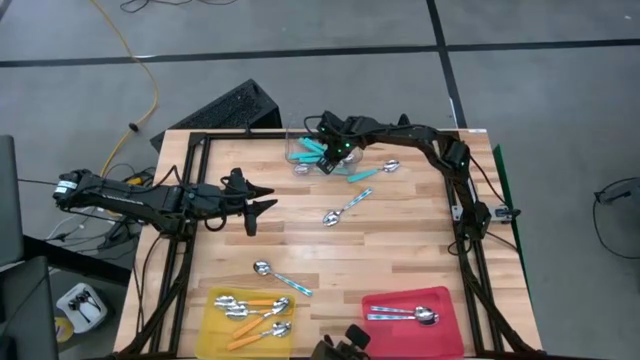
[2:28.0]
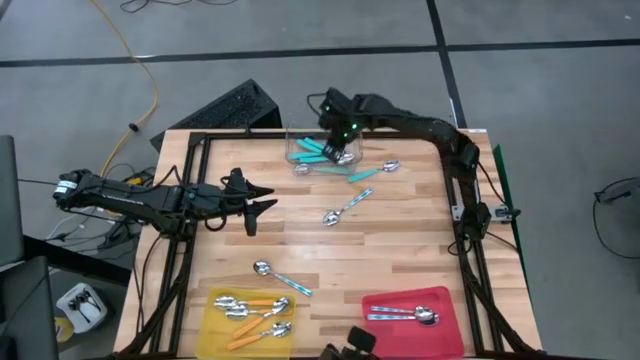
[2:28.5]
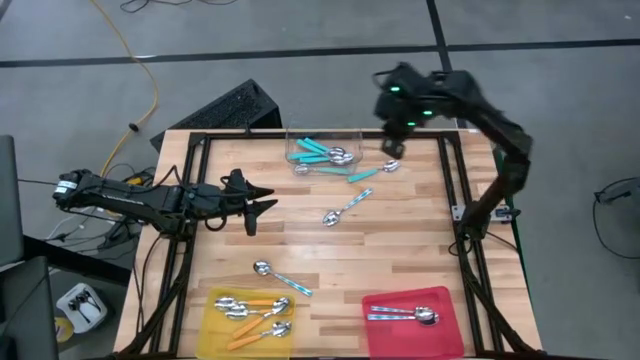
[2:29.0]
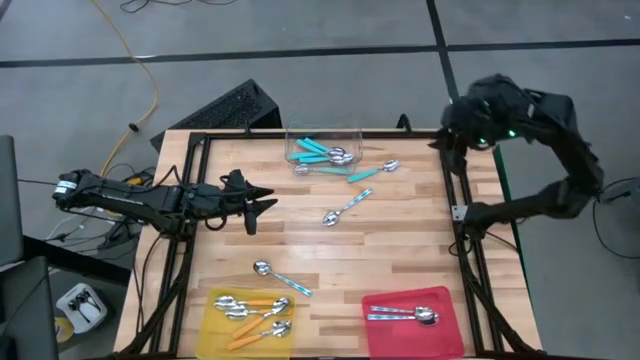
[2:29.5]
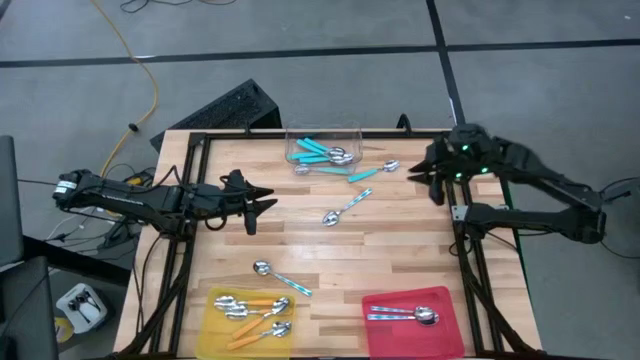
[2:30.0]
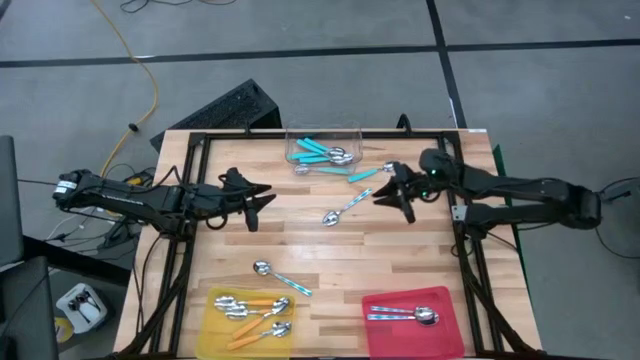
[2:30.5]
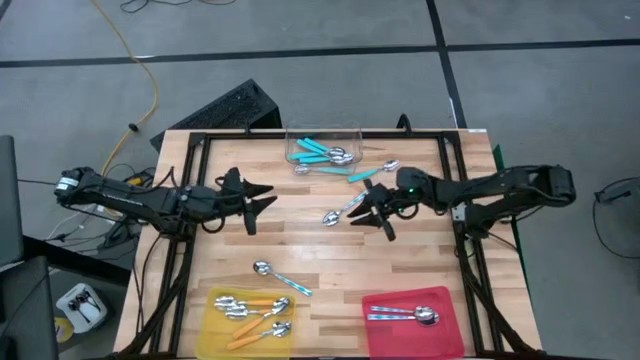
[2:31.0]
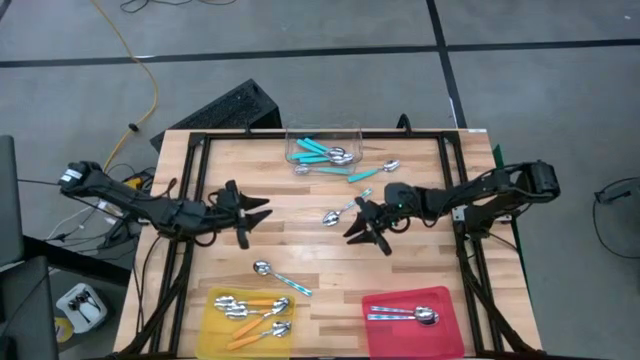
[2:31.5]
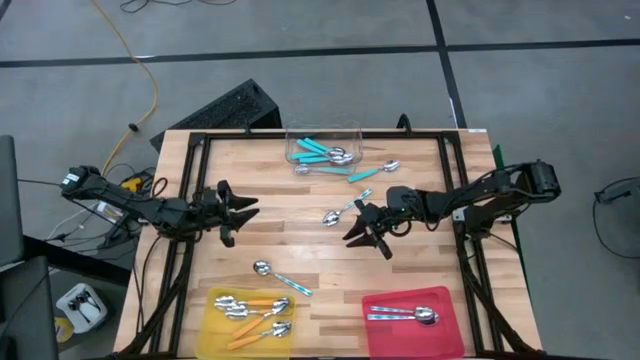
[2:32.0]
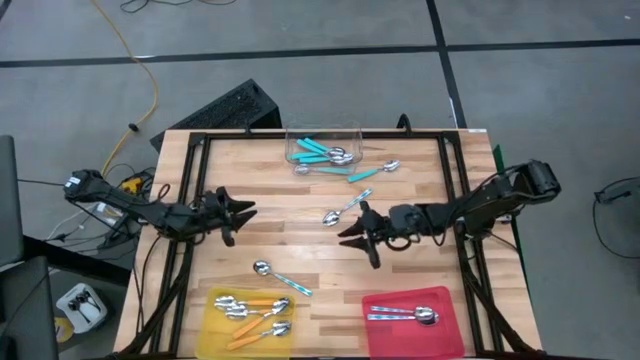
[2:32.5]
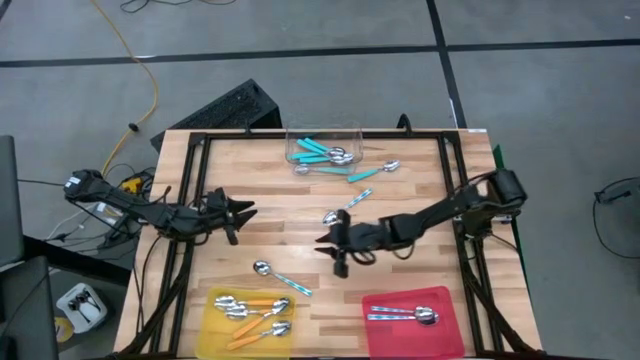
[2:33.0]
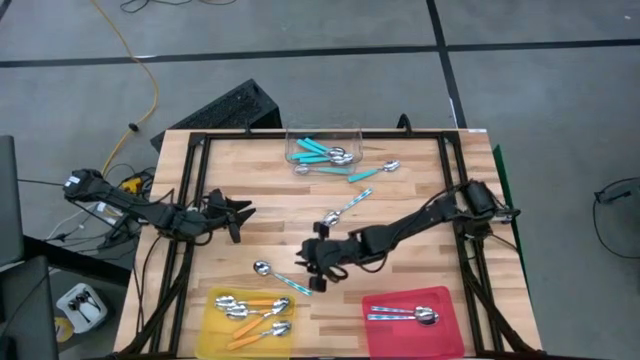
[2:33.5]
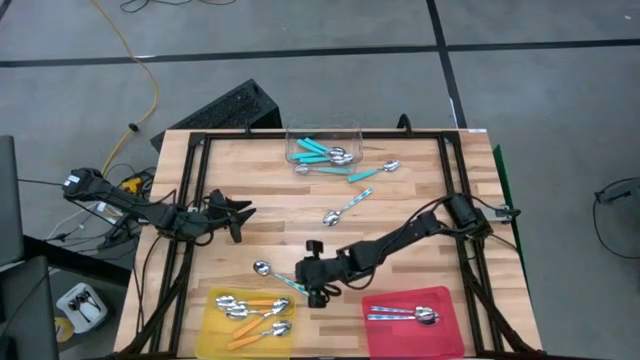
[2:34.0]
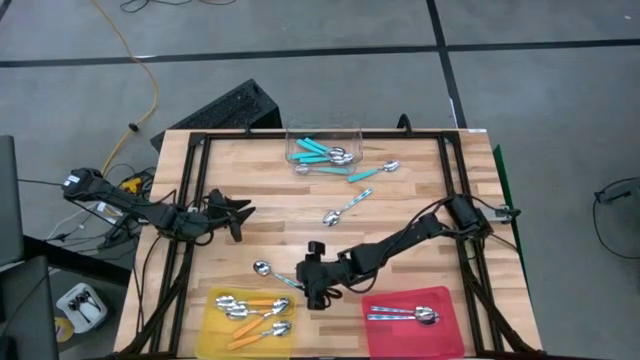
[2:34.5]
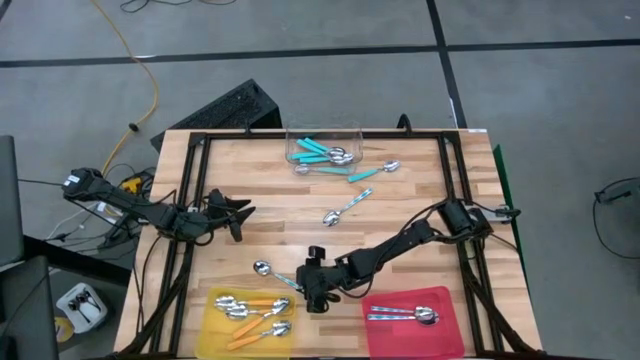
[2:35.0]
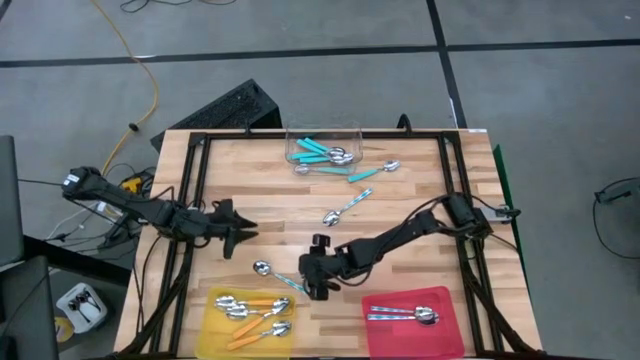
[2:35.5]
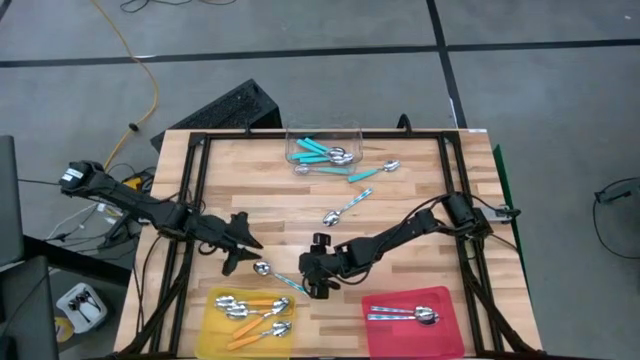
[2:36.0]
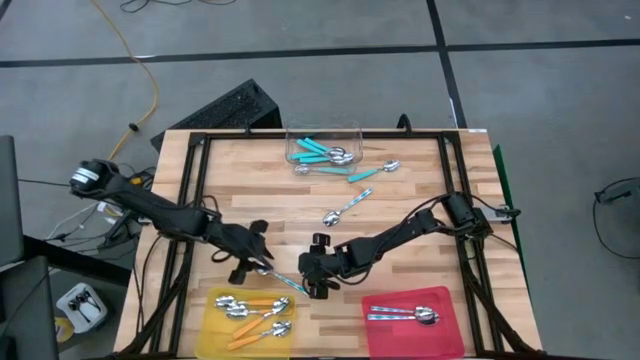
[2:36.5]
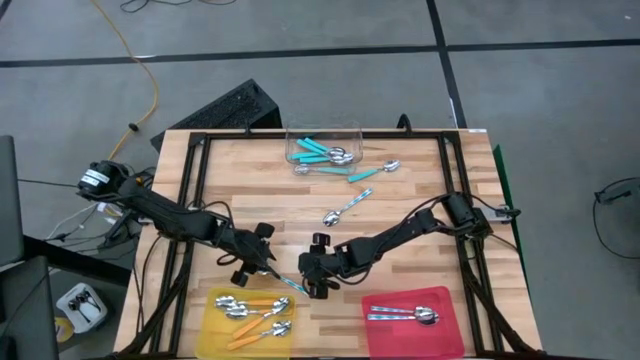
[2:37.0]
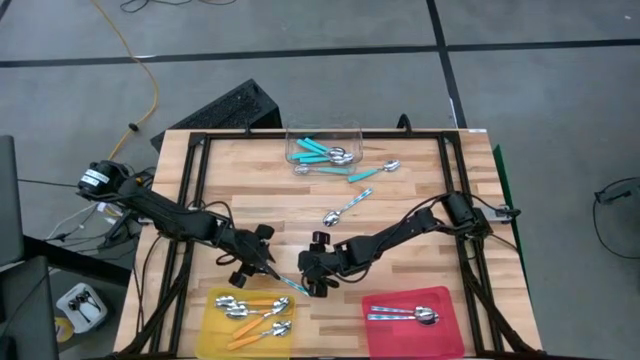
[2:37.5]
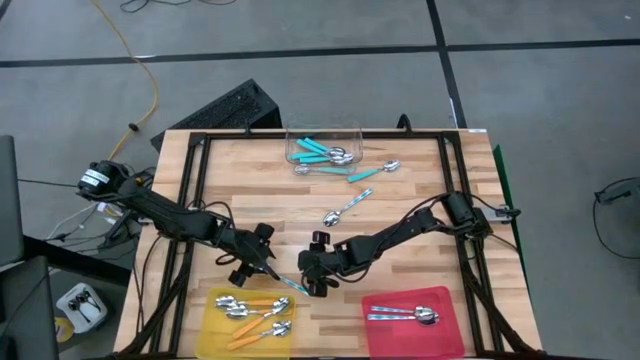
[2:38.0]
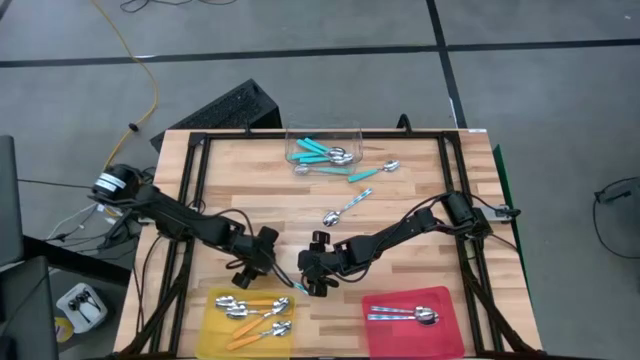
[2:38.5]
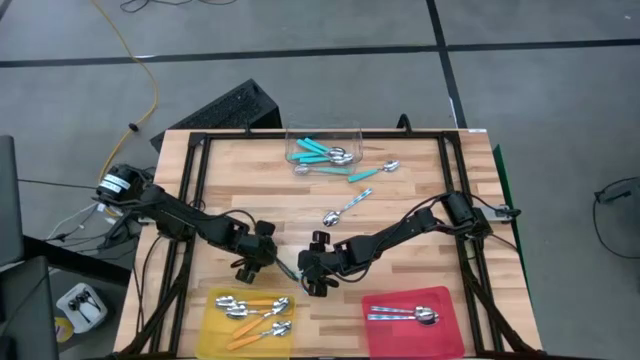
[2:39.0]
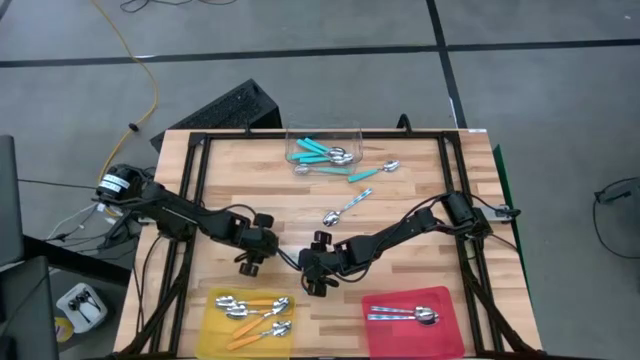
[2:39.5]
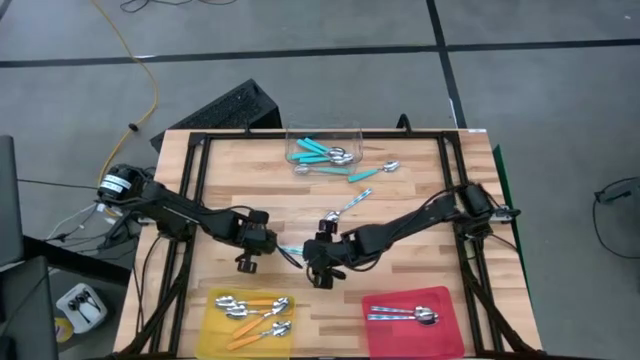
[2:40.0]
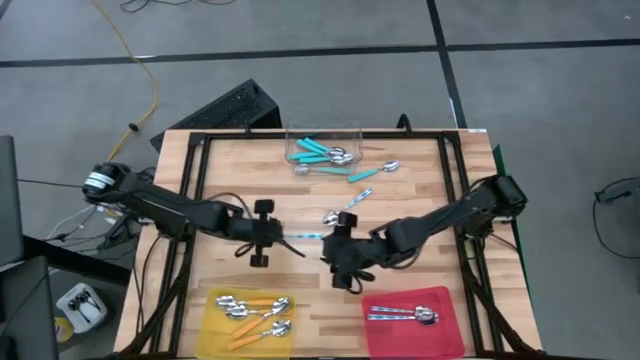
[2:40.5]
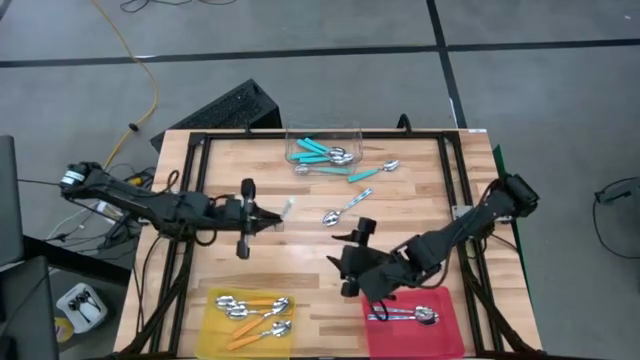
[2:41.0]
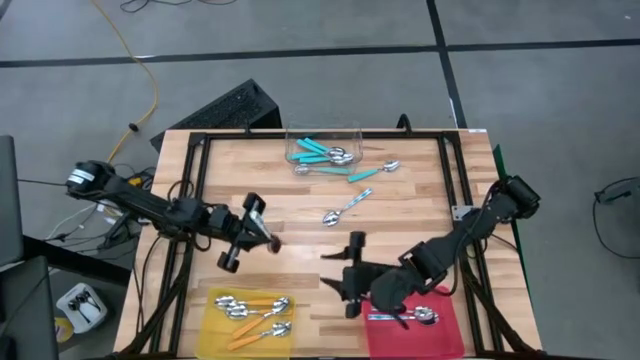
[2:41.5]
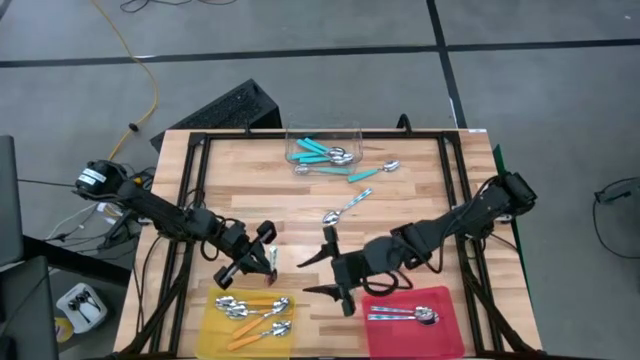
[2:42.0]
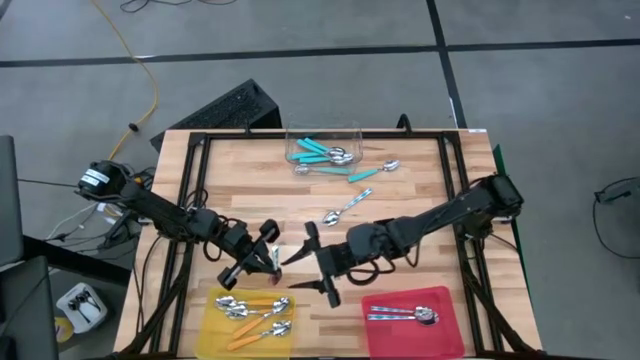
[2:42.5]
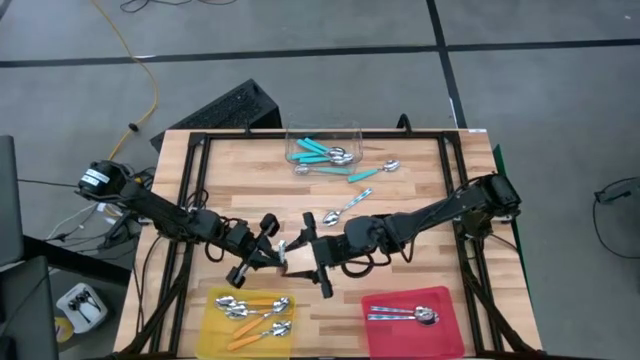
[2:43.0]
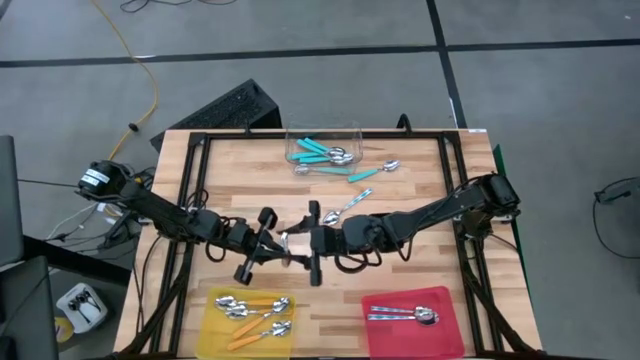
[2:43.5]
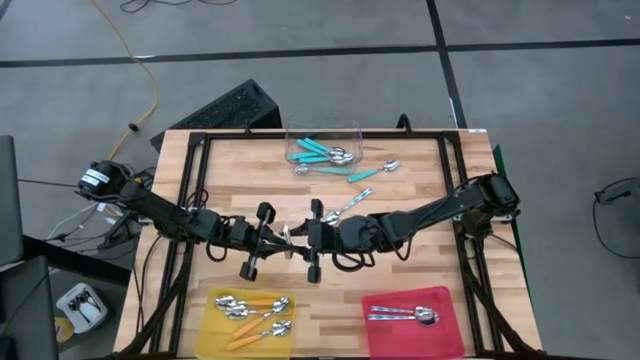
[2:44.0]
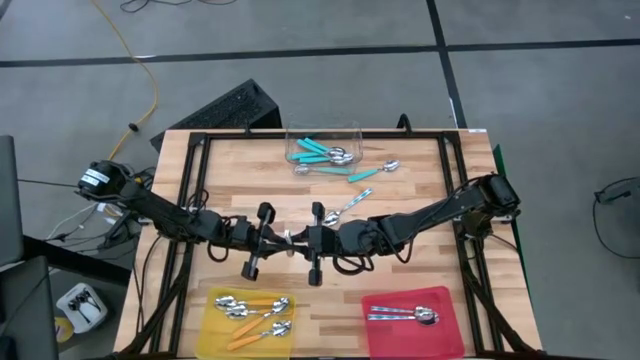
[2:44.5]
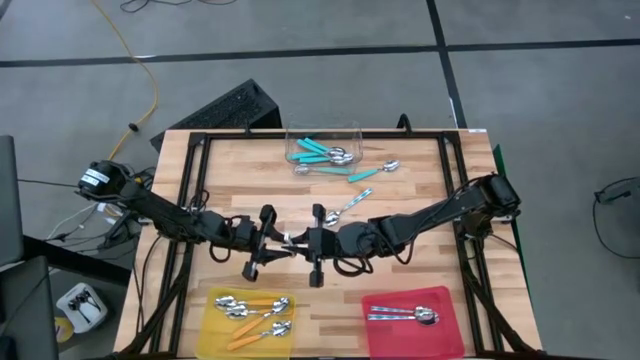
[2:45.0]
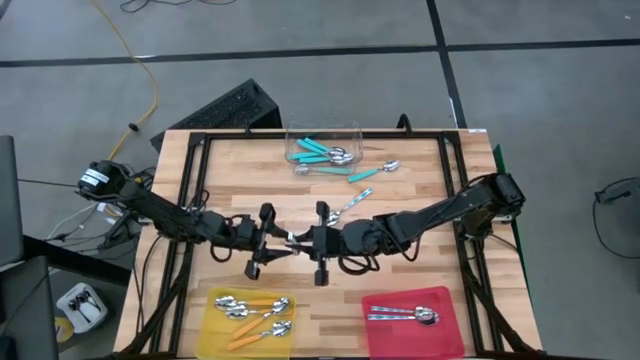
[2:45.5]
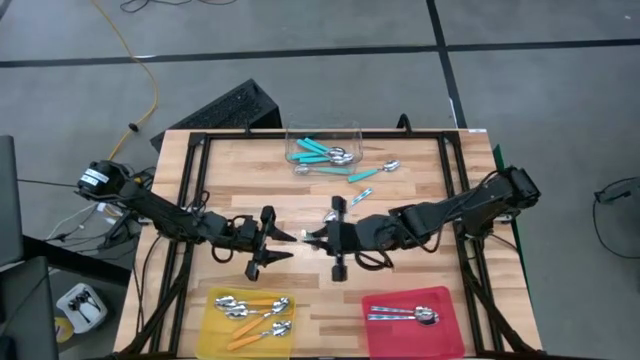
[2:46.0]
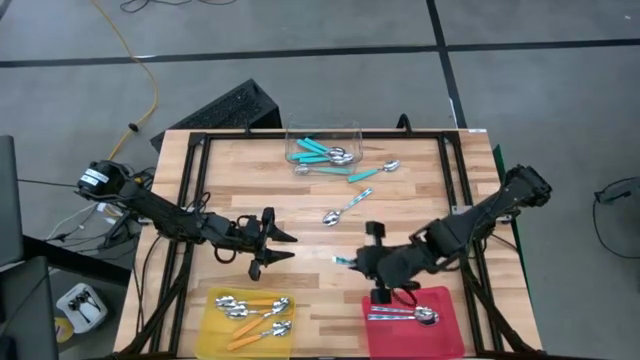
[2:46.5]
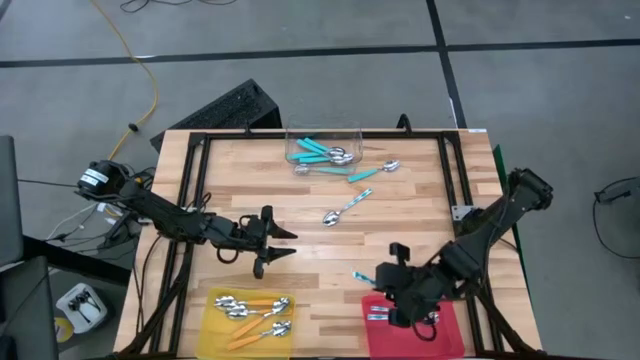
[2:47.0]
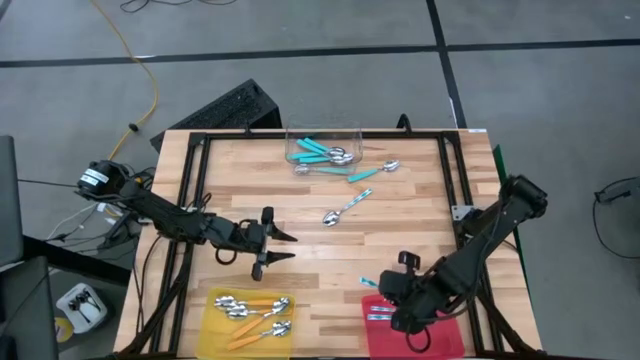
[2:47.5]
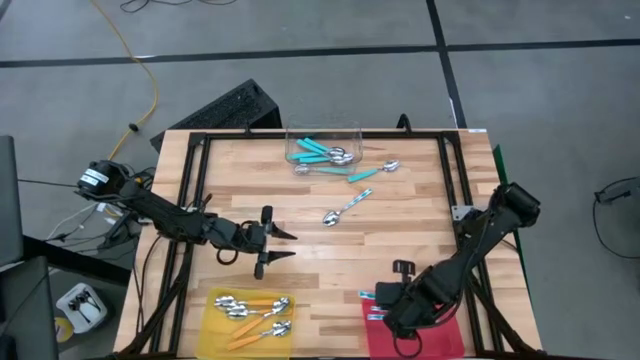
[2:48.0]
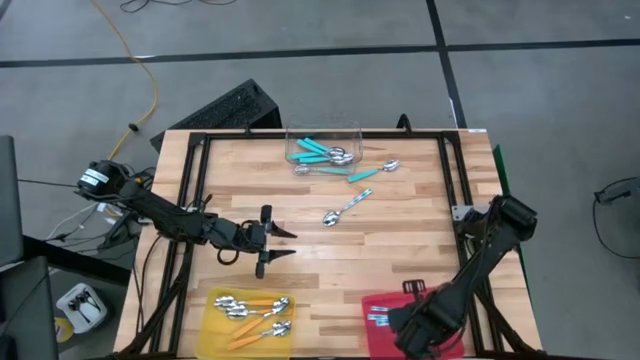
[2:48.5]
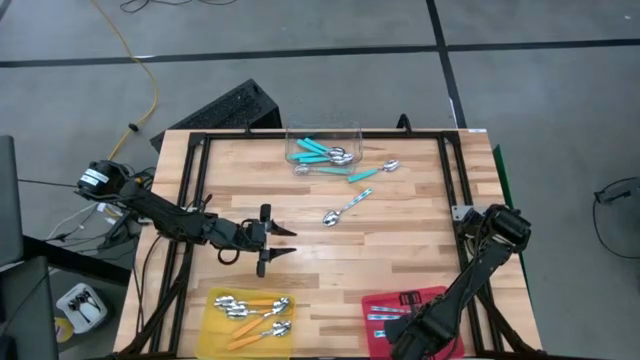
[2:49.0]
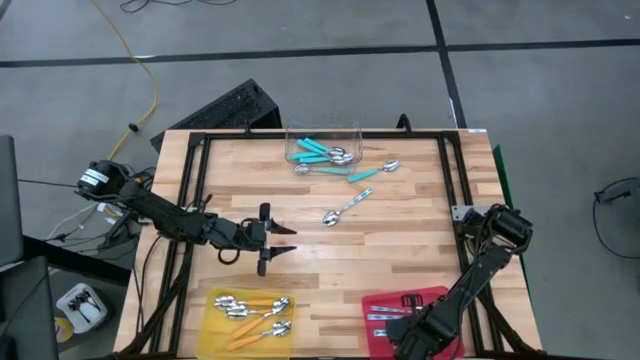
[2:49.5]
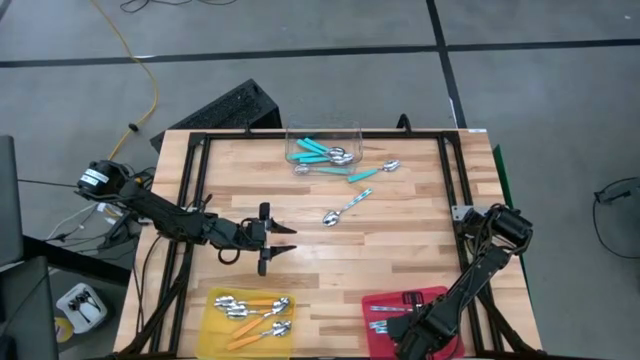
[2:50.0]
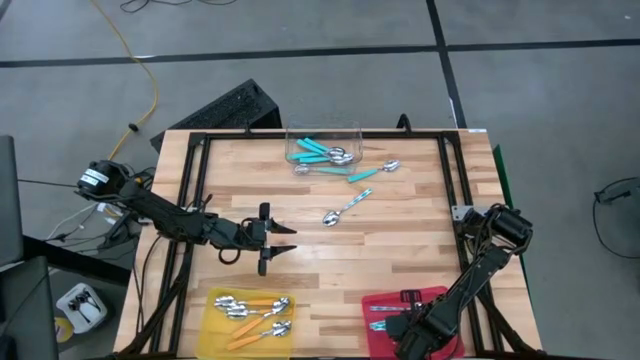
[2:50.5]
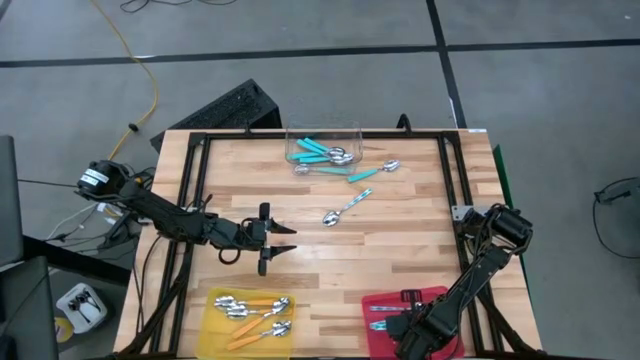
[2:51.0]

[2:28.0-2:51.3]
Task: Sort silverware by color (type)
Put the white and blue spoon into the red bin
